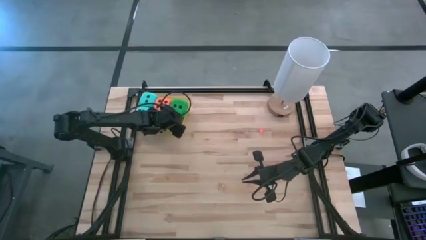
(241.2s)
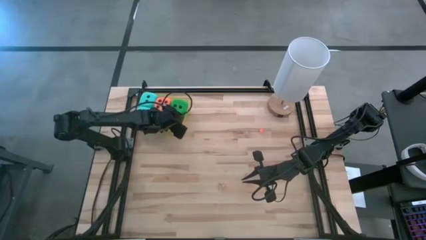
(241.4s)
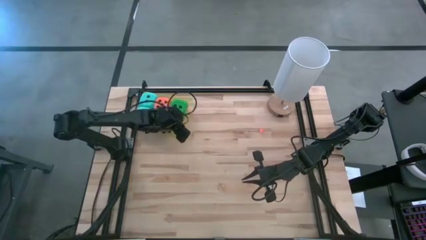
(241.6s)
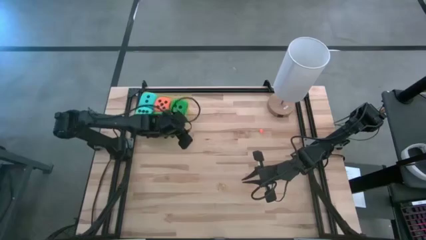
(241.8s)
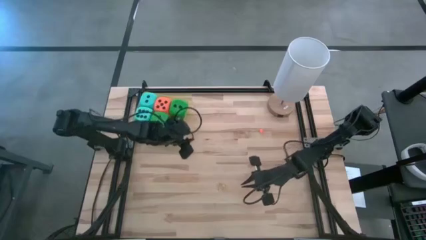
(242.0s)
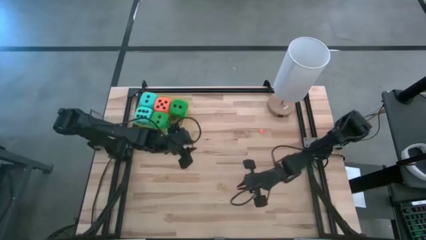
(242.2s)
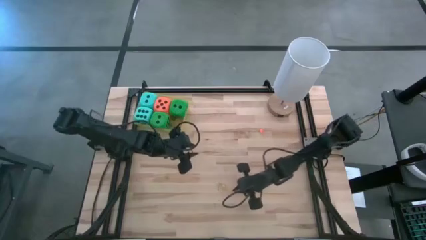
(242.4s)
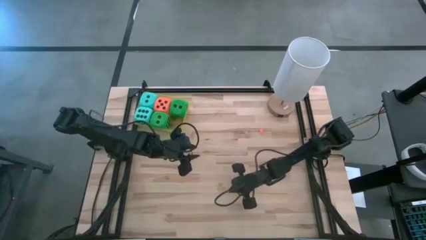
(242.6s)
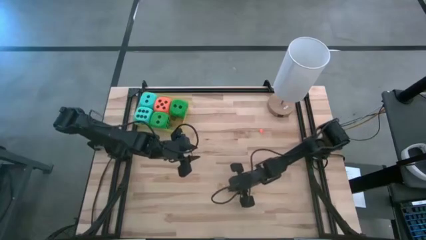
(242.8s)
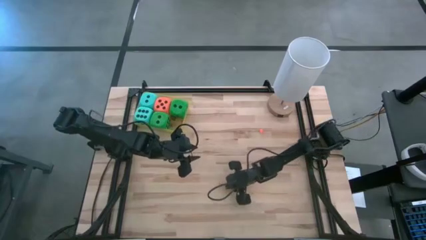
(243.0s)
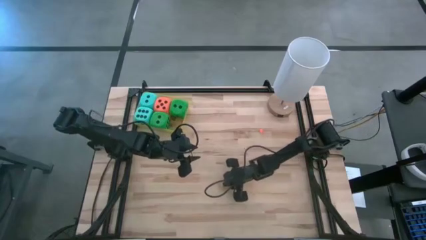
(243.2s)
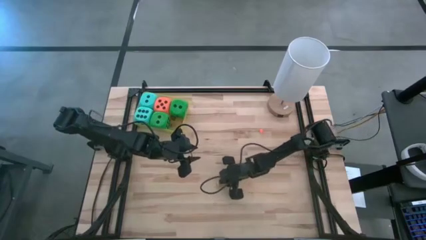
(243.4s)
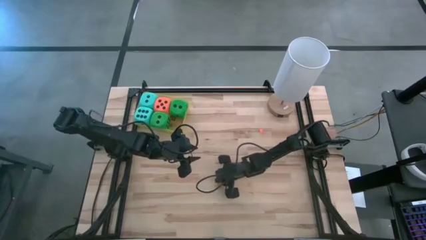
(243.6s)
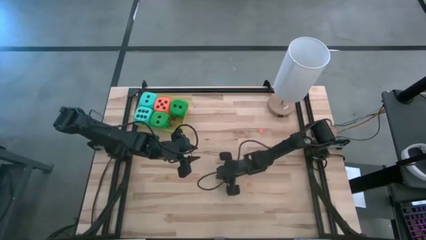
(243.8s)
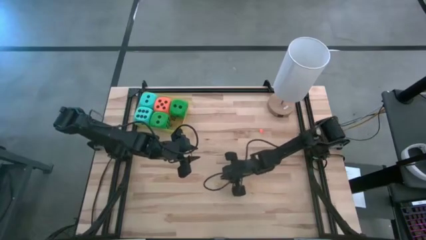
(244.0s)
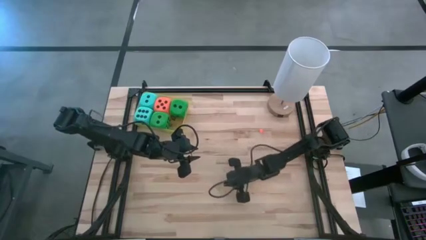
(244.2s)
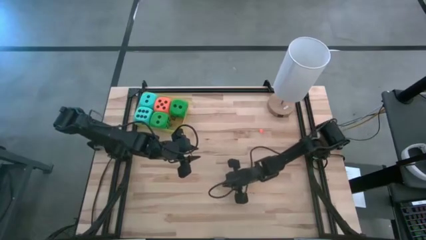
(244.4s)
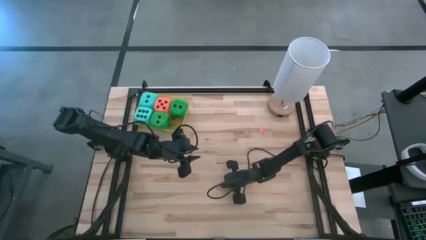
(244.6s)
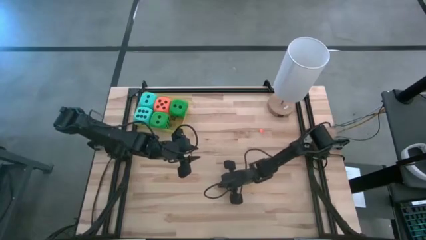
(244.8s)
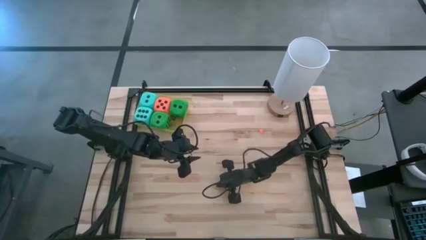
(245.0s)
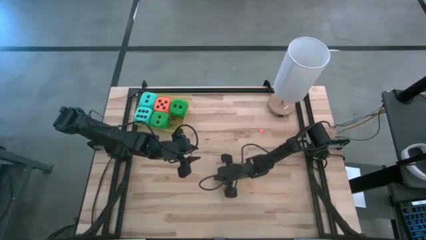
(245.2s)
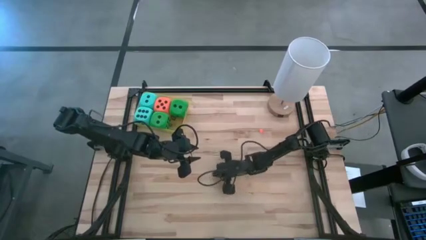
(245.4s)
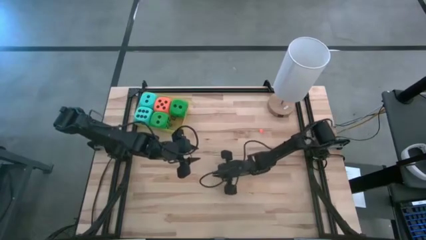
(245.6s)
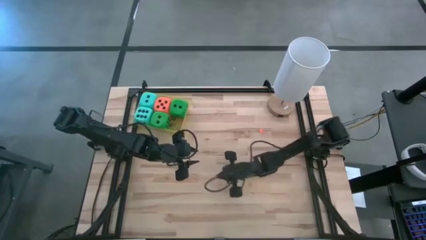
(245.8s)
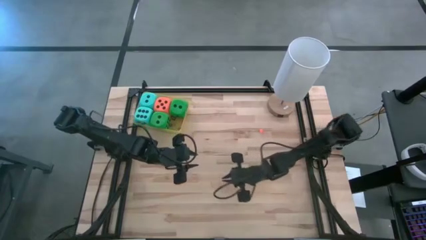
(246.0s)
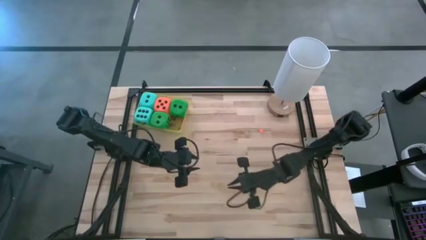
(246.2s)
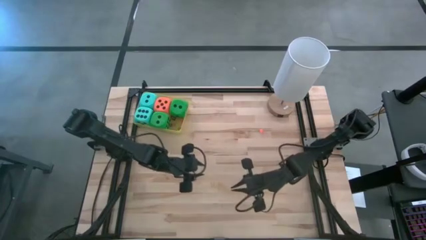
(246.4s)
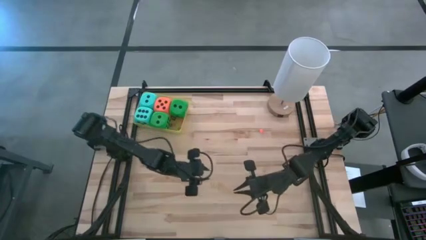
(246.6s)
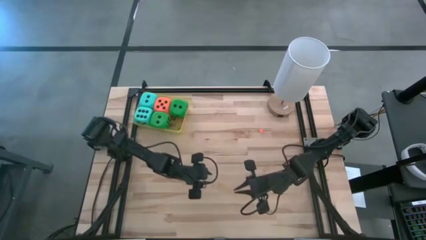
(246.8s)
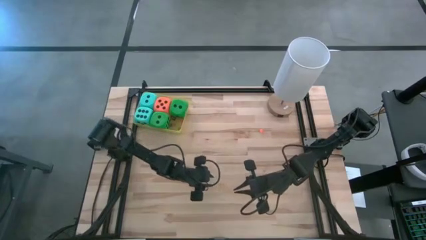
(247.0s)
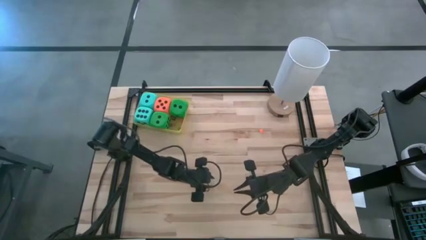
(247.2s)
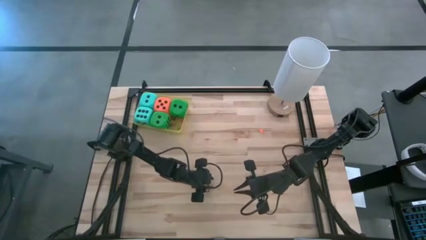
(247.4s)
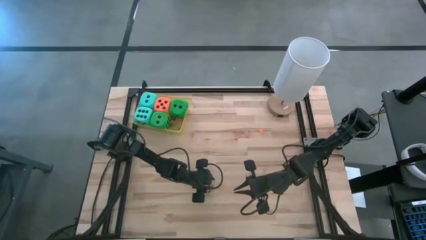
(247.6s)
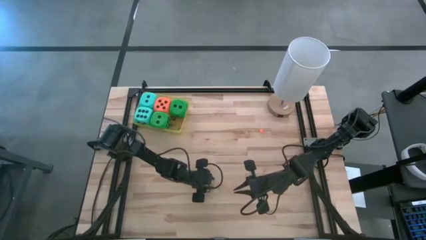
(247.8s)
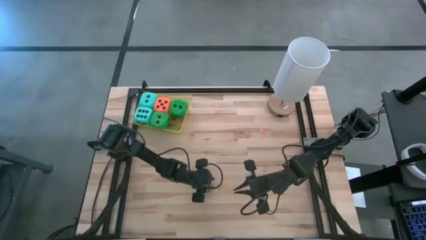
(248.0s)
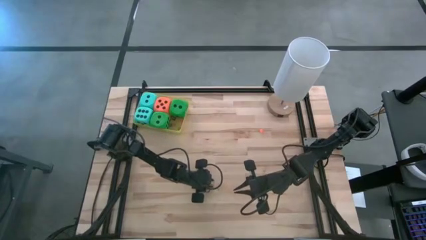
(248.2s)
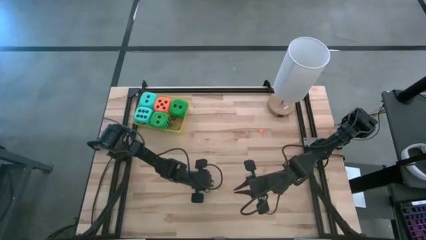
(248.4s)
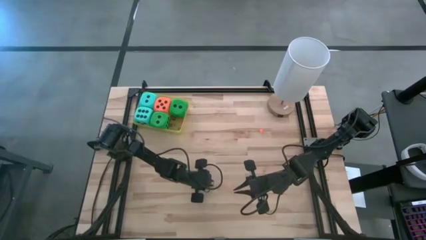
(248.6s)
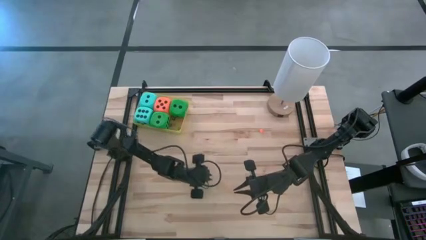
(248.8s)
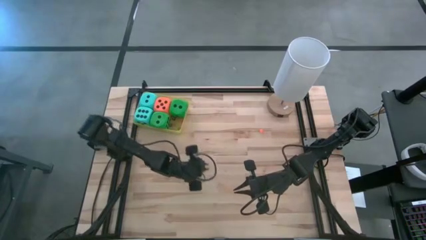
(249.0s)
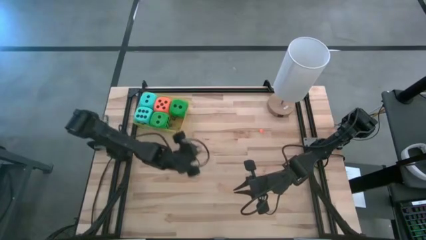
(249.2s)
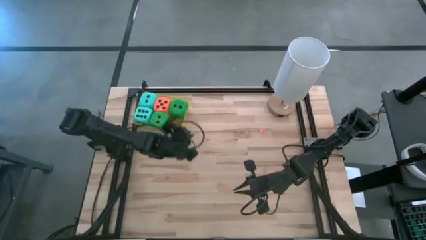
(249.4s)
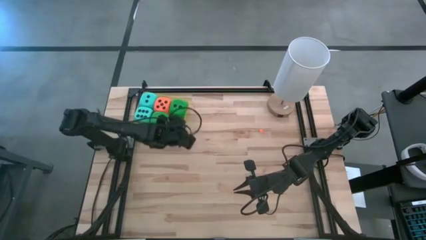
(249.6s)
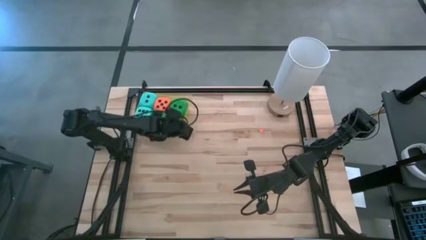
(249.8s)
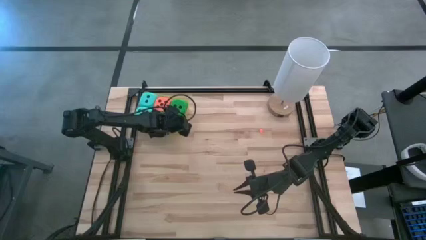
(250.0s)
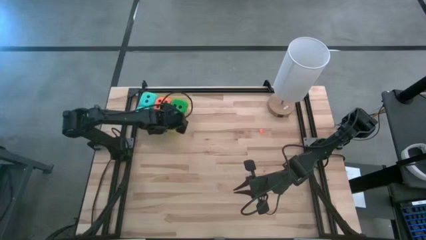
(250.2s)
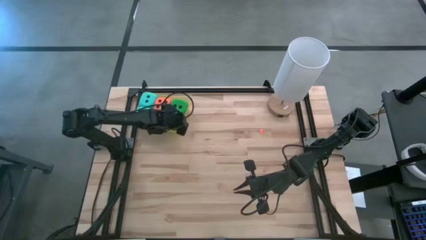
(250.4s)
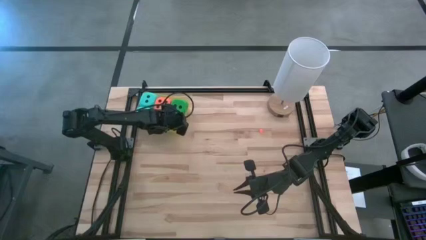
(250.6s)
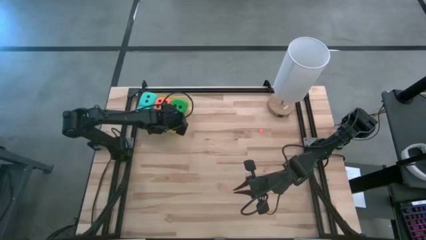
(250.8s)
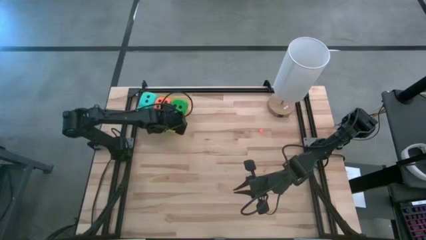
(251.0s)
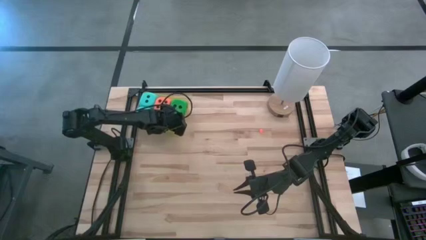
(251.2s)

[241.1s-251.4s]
Task: Pick & Place Dice
Put the yellow small die into the yellow container

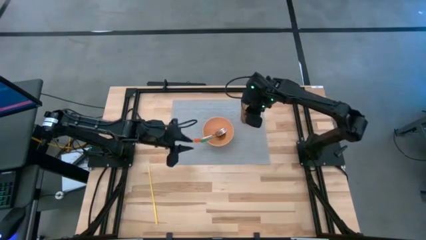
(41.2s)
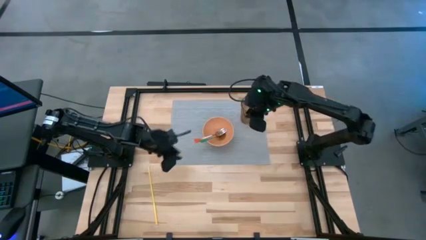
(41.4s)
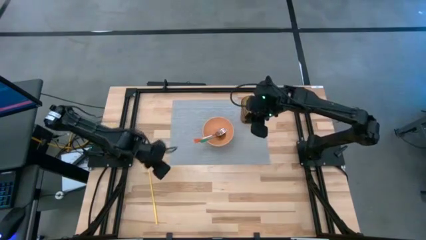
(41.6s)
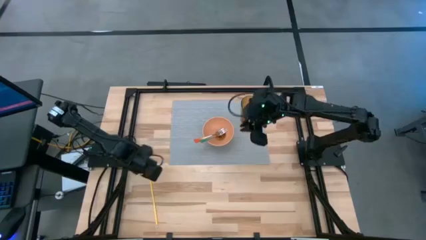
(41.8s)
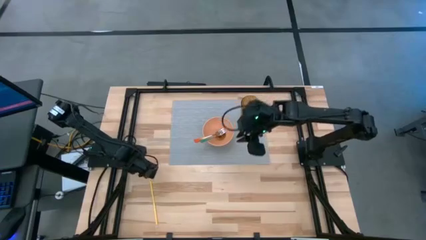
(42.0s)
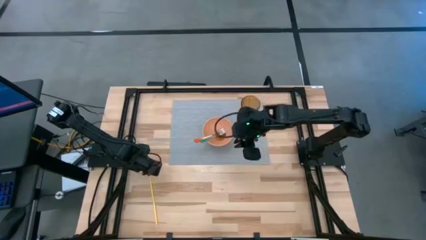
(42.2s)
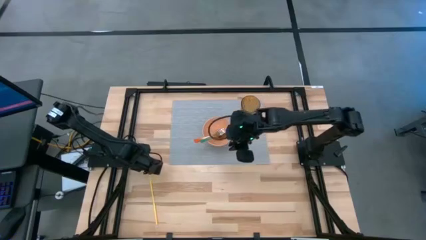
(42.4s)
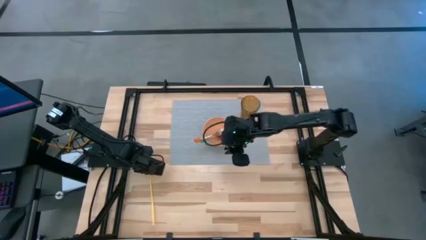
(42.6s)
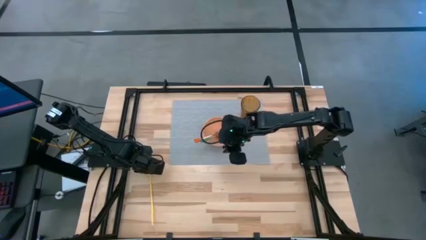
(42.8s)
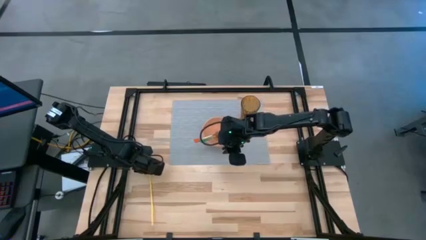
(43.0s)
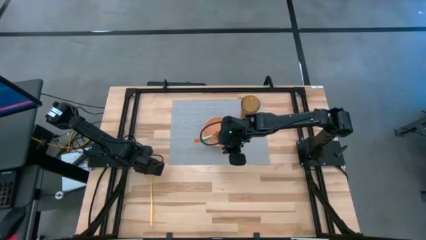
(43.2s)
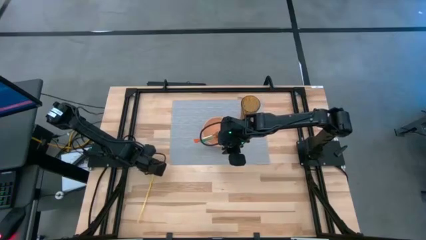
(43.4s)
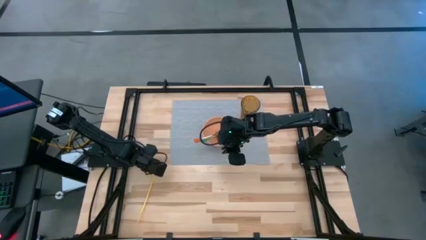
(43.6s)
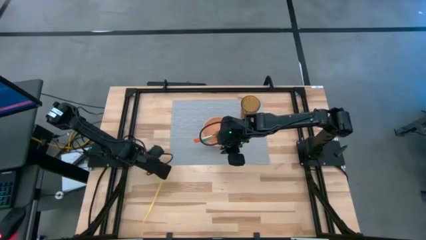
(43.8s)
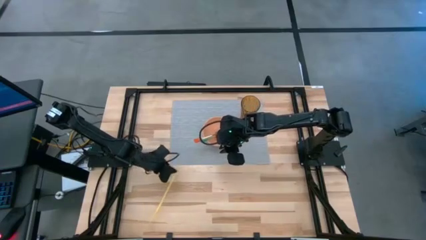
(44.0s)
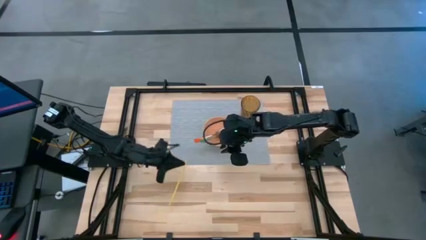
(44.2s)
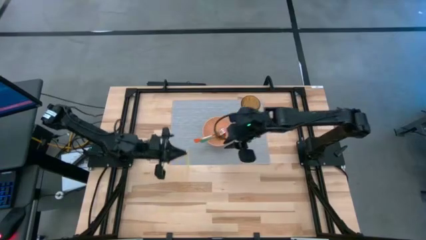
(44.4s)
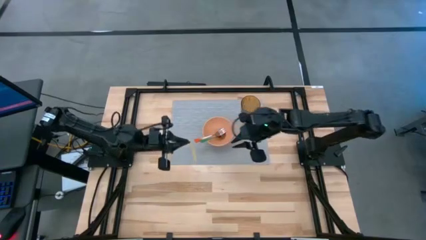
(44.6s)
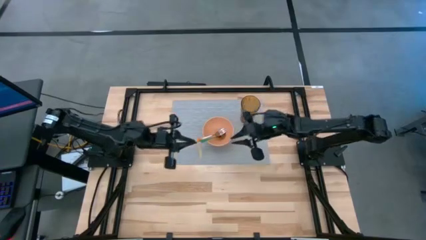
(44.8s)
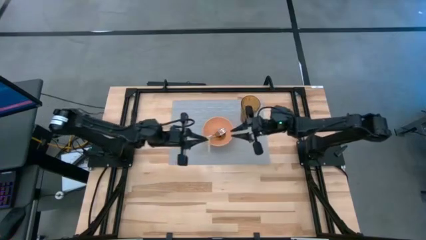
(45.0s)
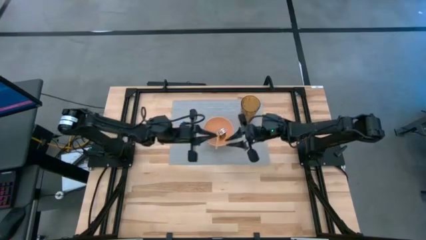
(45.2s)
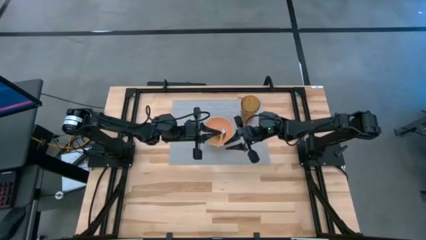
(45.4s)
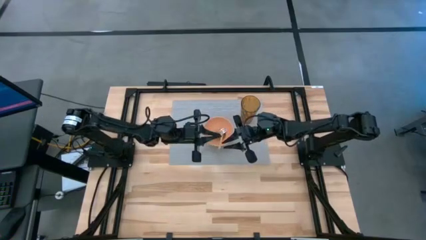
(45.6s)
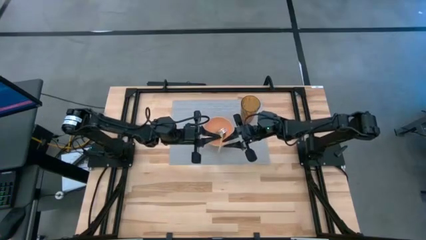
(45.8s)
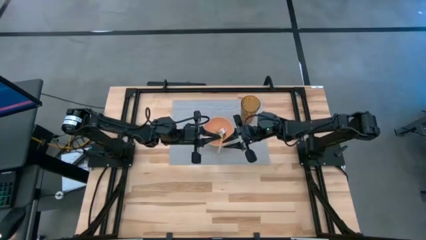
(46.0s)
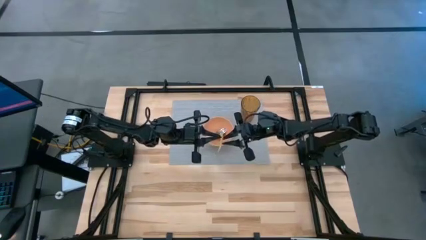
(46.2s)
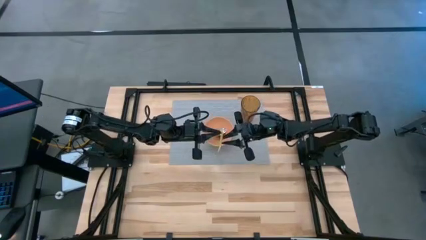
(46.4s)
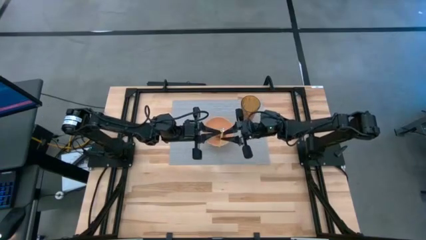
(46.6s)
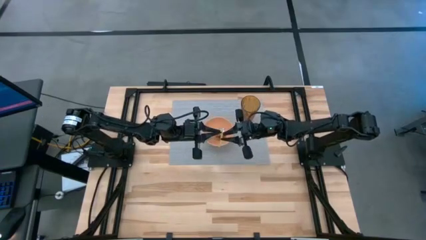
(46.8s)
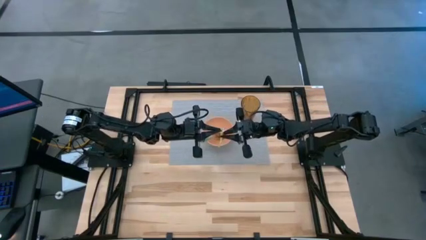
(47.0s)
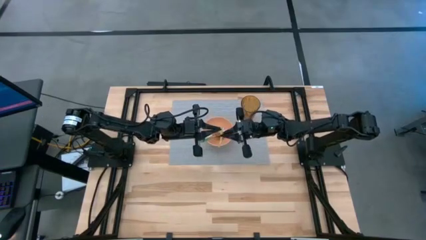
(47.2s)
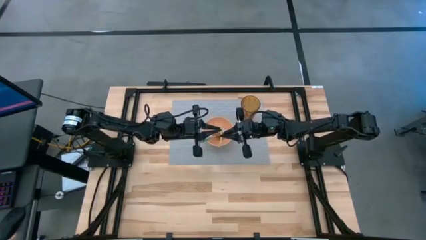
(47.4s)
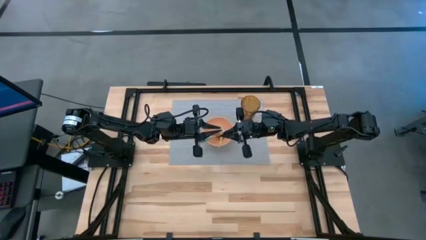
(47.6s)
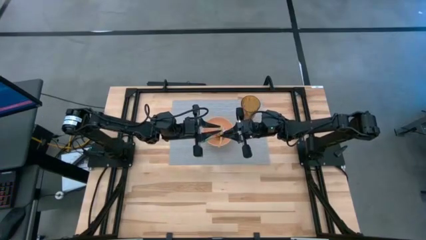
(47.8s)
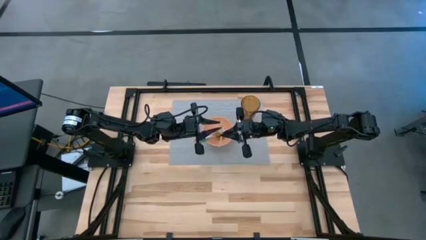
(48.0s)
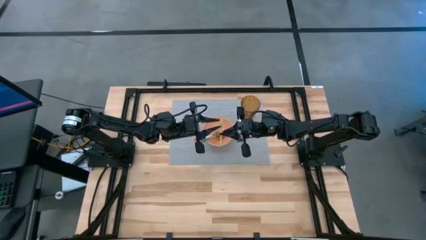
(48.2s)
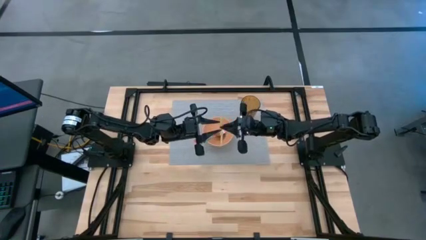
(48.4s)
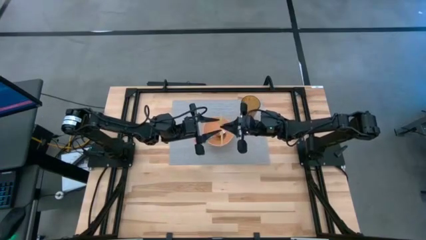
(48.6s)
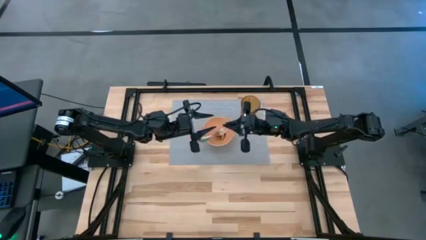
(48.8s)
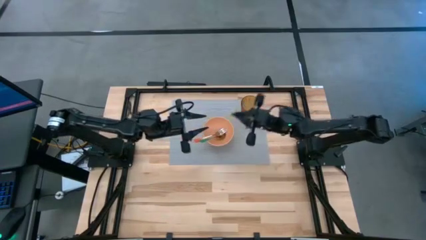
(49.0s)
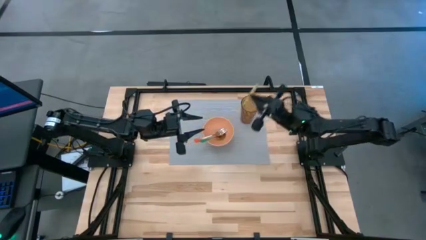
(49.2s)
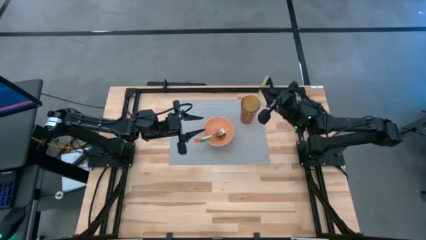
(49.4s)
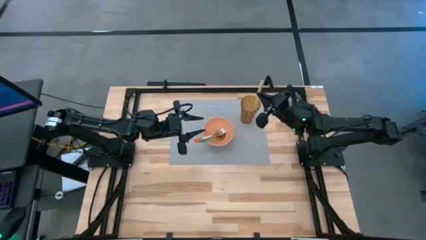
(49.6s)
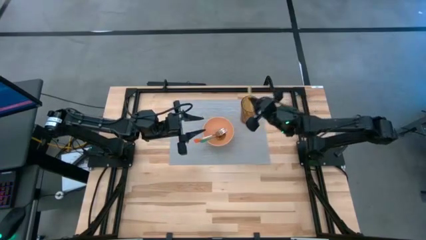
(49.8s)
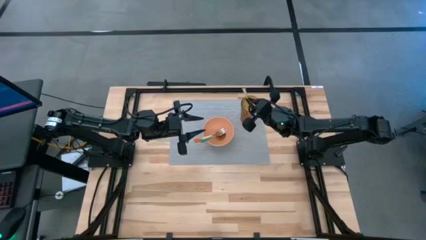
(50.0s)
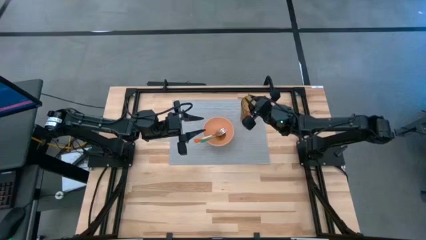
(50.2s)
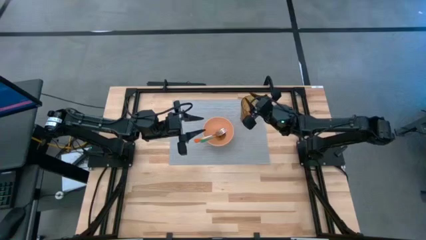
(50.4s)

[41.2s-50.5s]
Task: Pick & Place Utensil
Put the yellow straw into the brown cup
